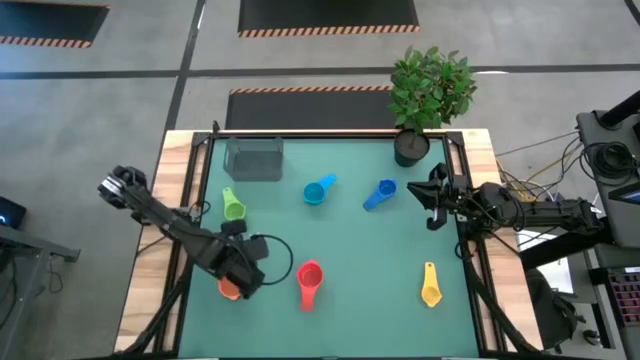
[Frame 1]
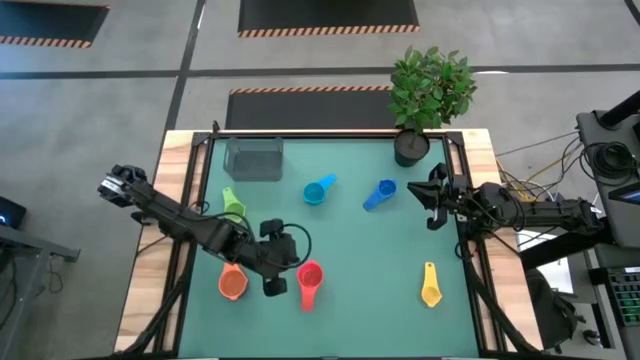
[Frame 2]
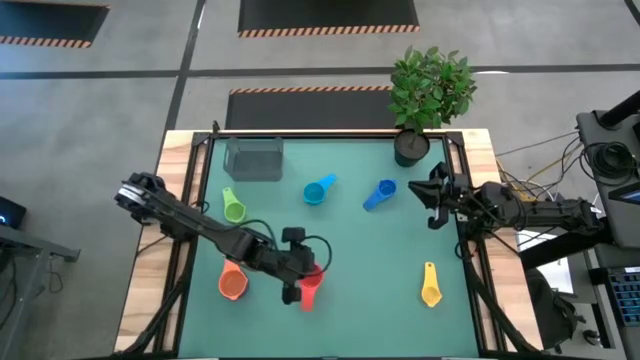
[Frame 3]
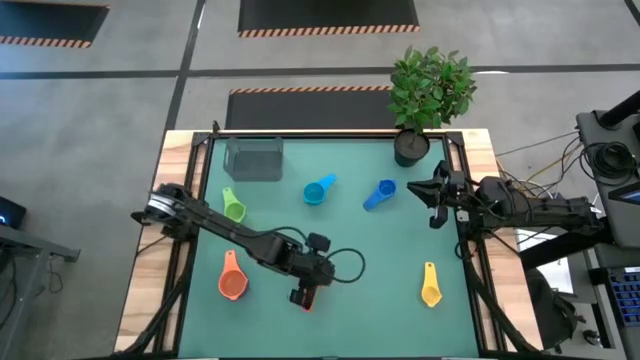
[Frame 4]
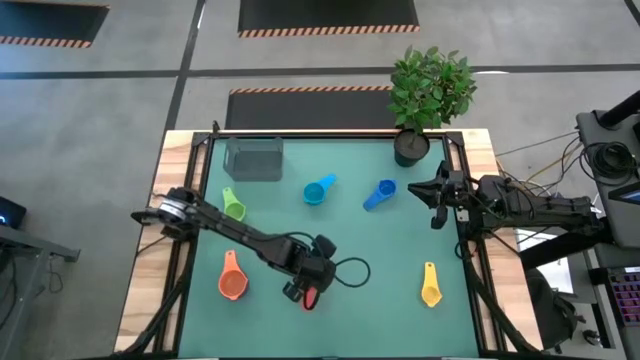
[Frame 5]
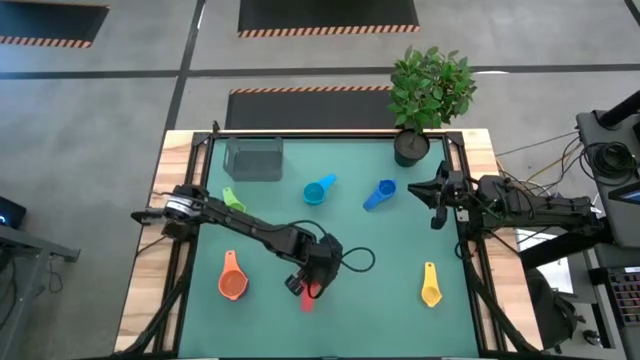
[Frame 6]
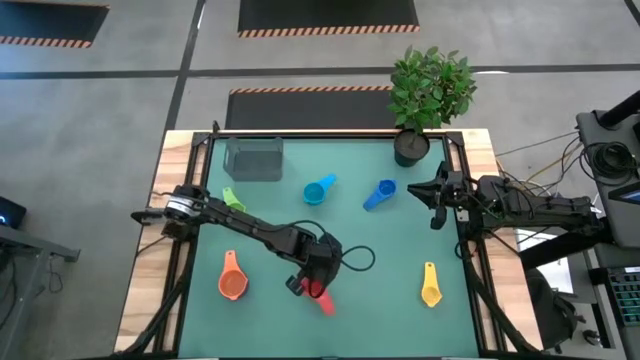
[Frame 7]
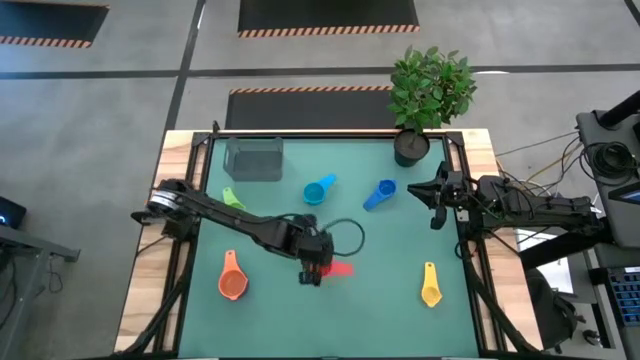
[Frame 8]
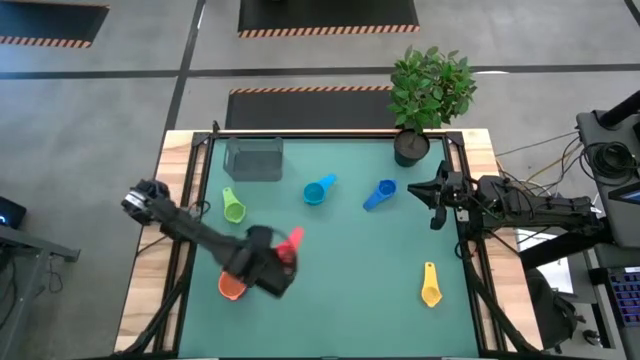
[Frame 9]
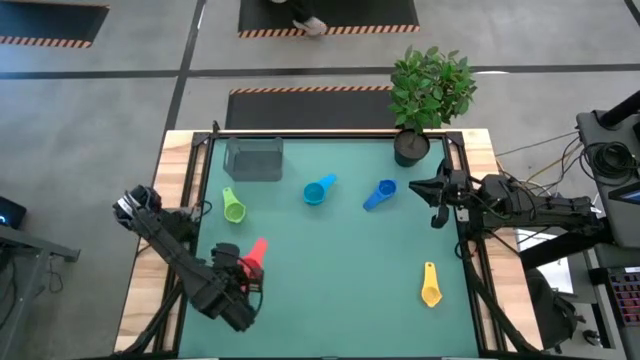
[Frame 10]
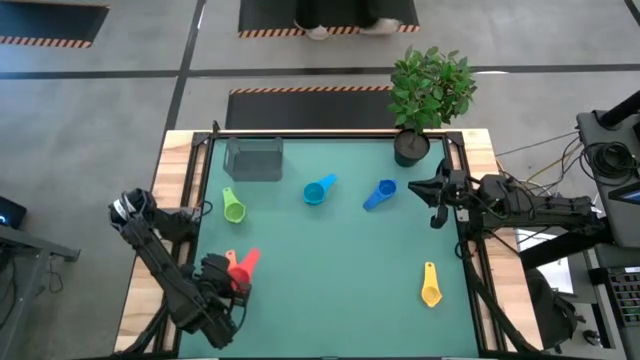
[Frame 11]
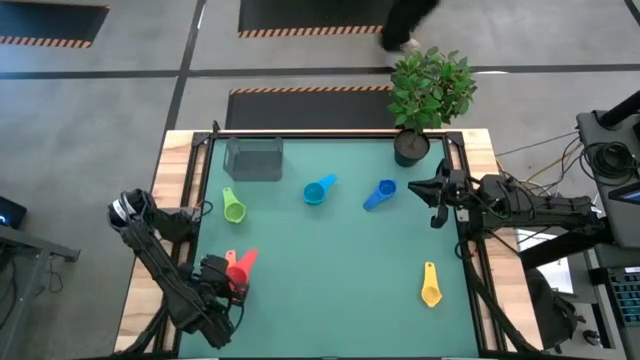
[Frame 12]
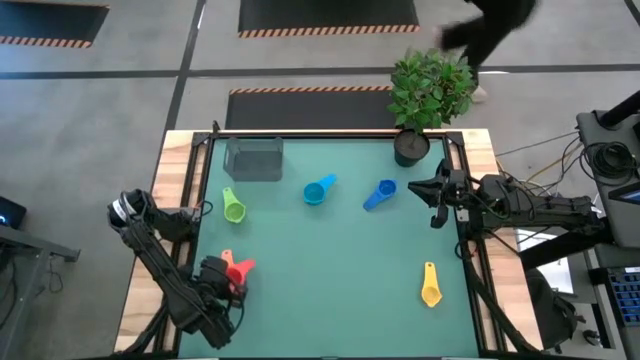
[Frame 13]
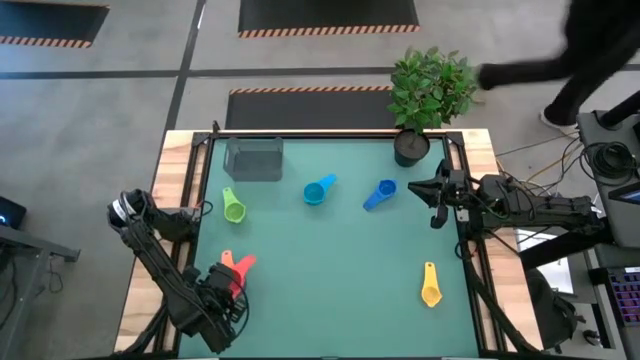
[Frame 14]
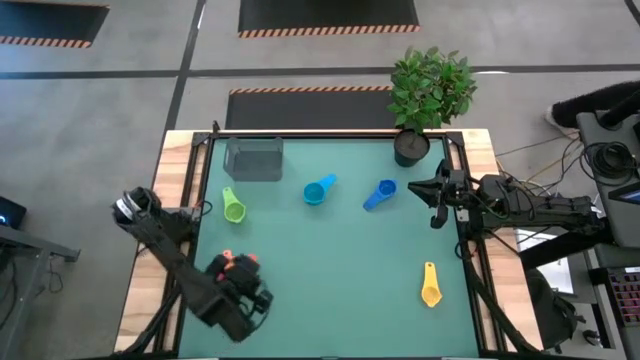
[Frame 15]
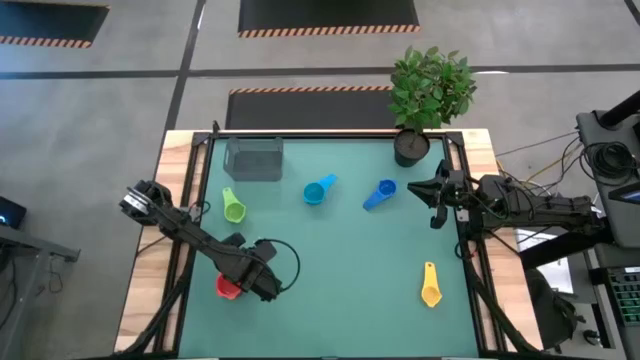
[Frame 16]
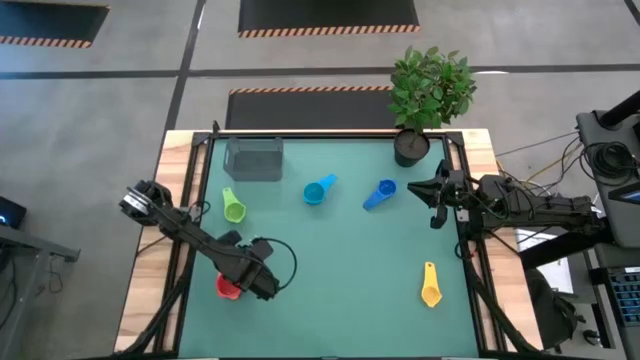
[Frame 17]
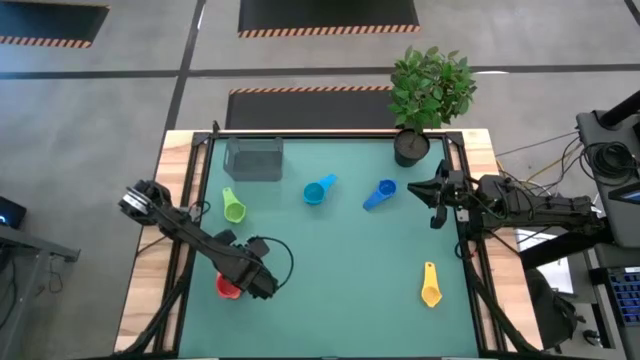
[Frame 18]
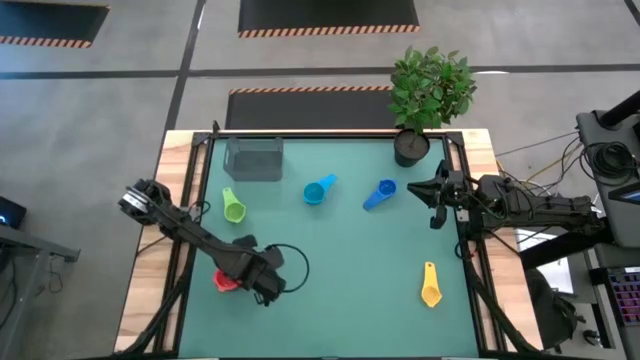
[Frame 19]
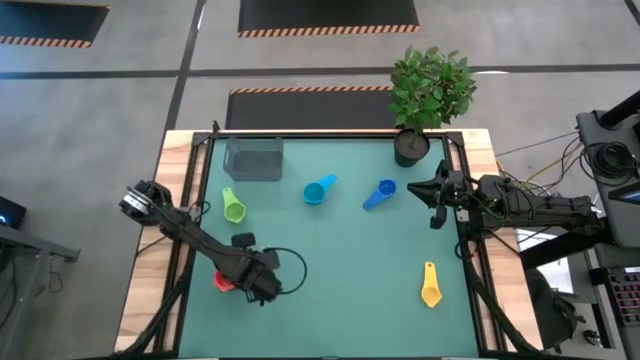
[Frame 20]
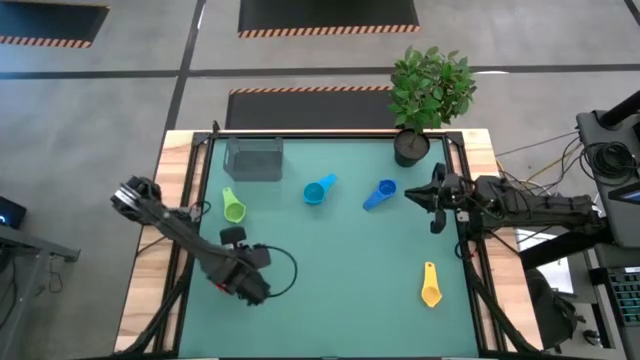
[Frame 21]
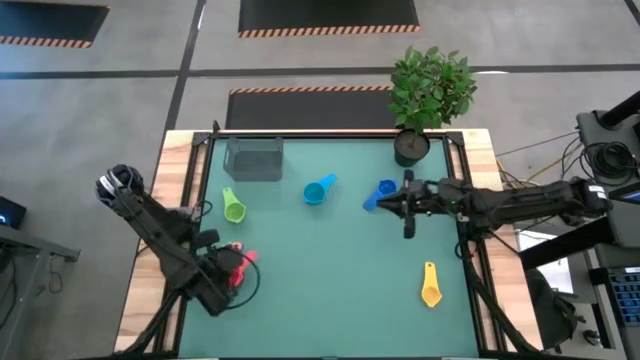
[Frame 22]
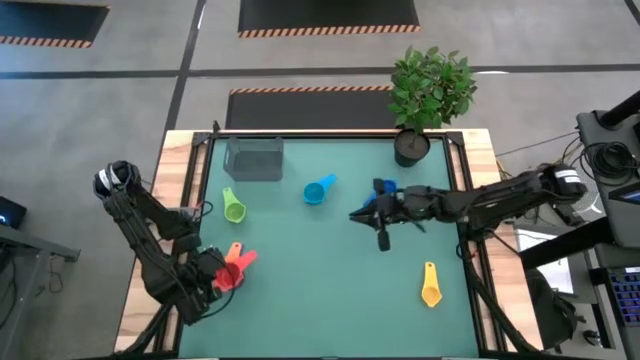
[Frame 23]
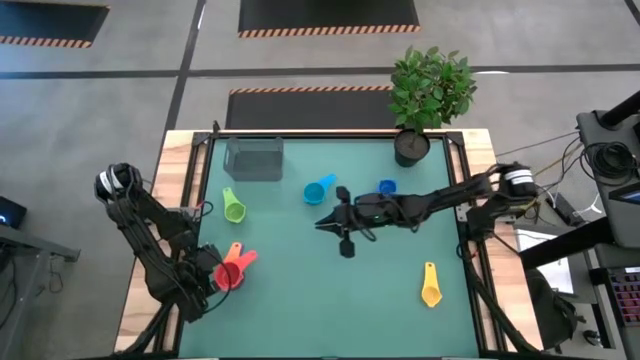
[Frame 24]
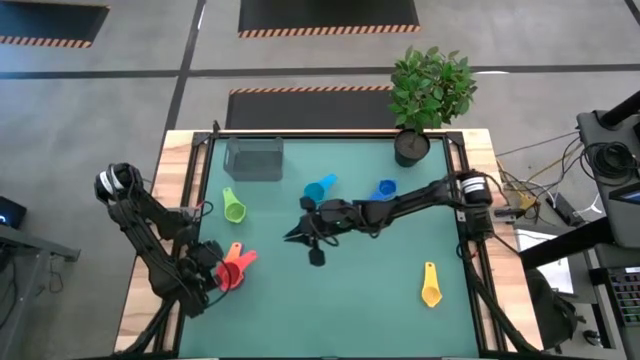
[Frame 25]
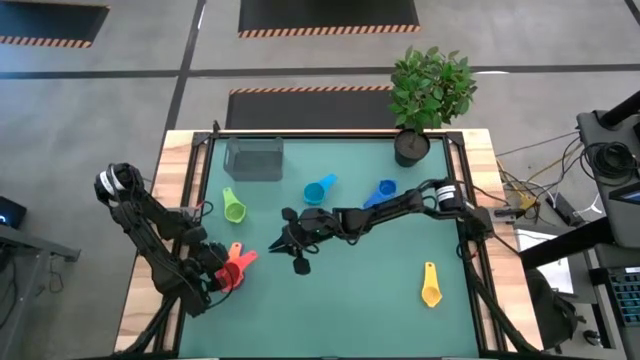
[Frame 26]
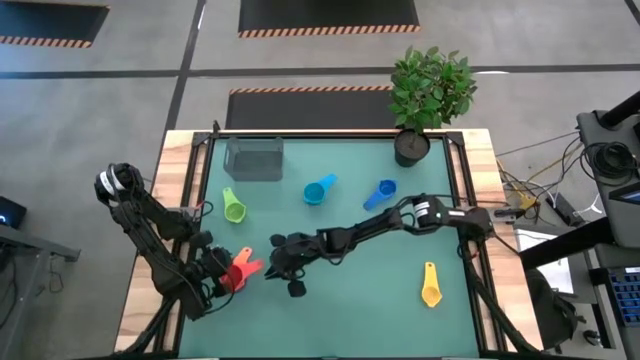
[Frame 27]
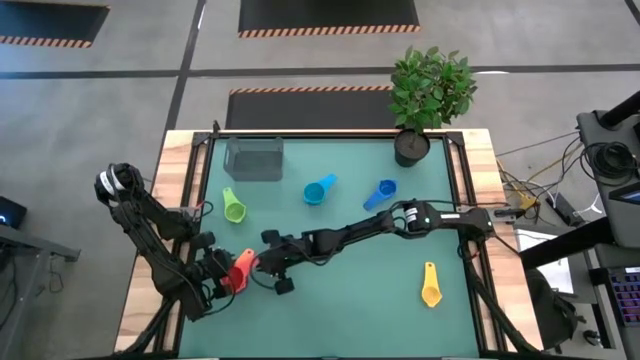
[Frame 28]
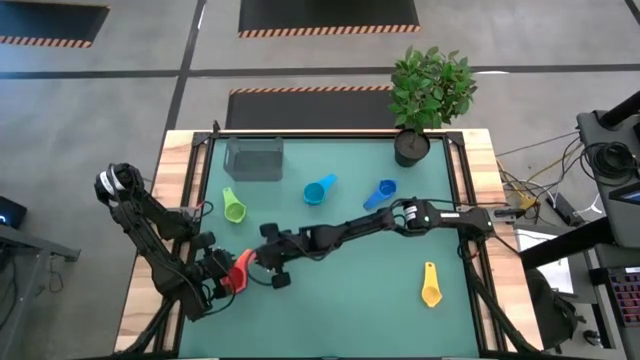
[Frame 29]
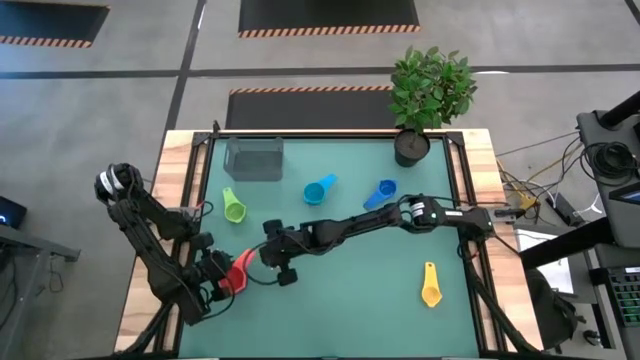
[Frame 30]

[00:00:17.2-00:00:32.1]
Task: Nest measuring cups in basket
Stack the red measuring cup on top of the orange measuring cup

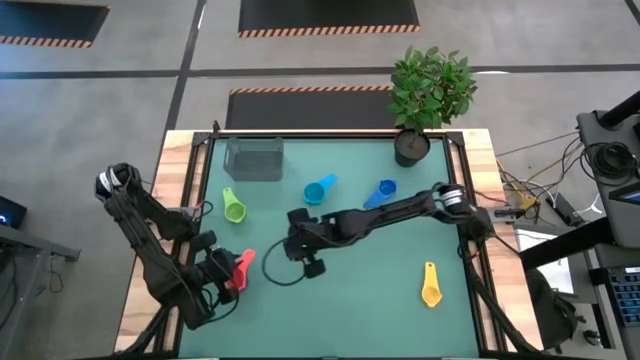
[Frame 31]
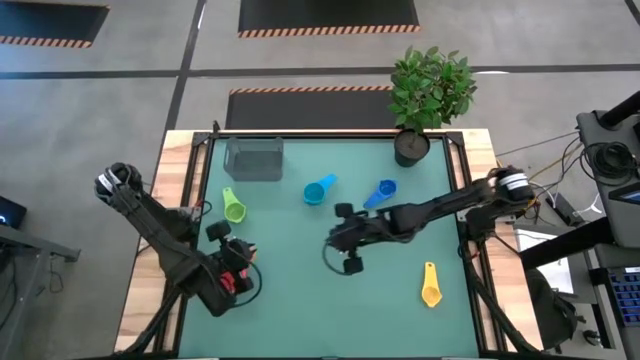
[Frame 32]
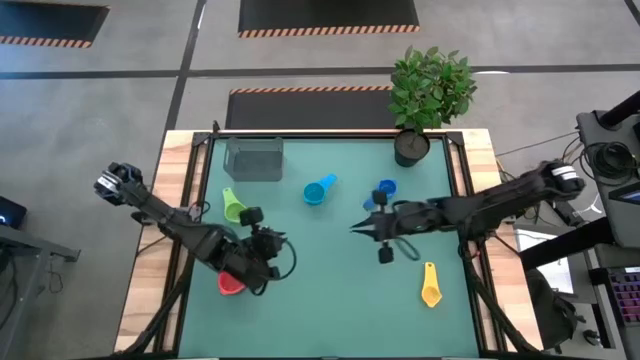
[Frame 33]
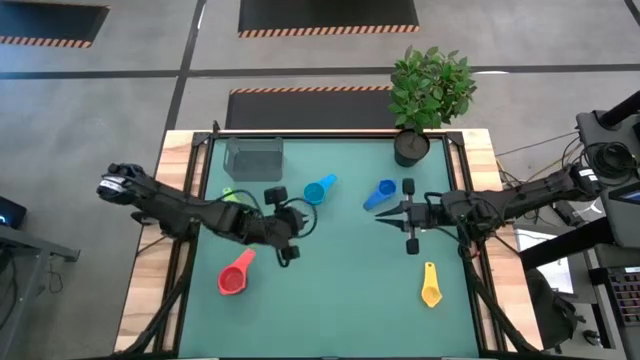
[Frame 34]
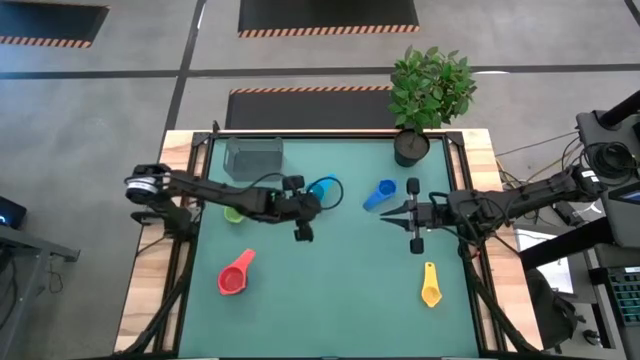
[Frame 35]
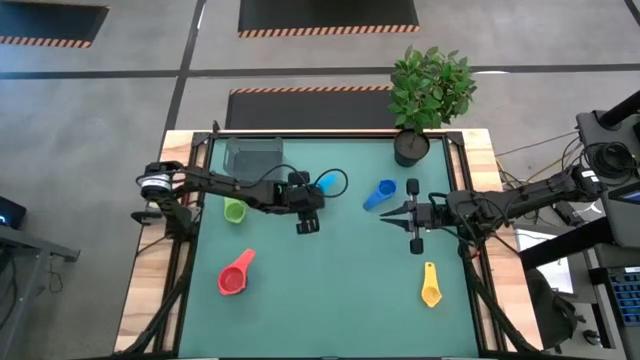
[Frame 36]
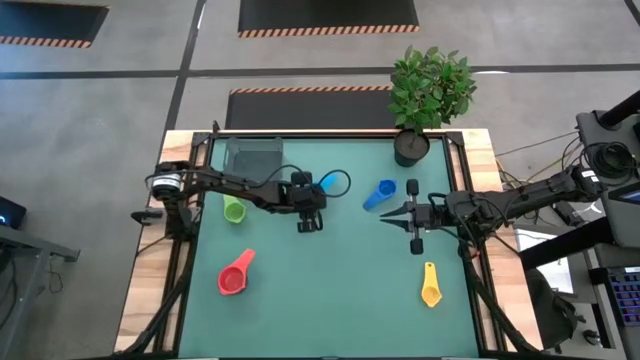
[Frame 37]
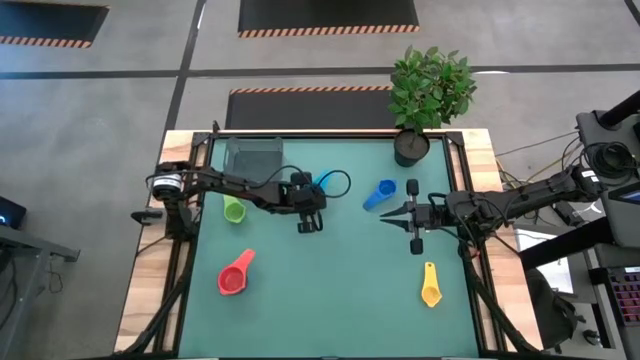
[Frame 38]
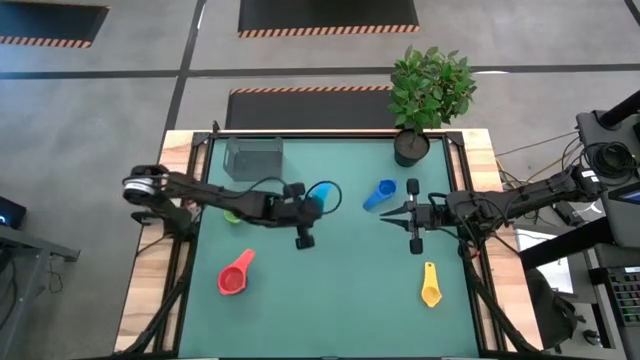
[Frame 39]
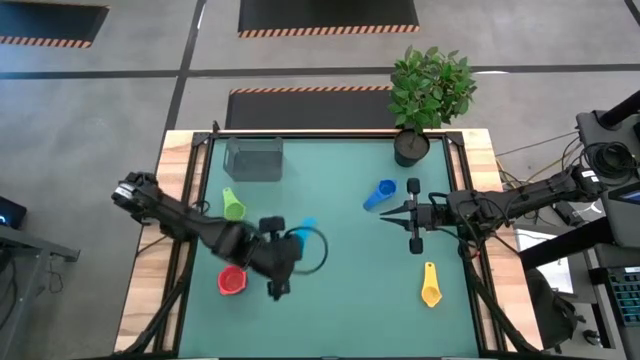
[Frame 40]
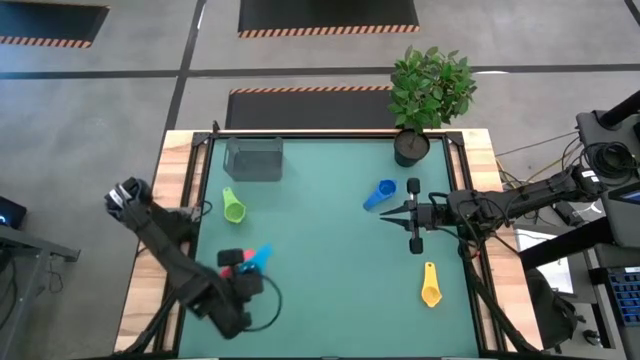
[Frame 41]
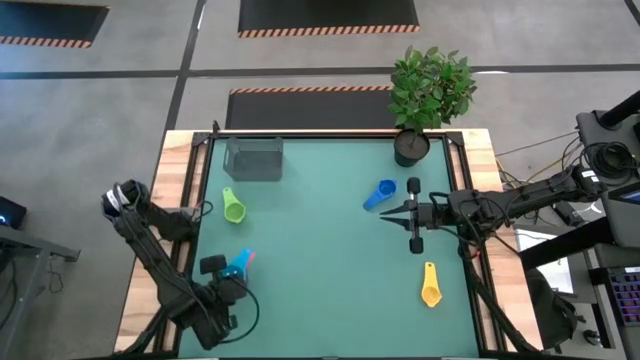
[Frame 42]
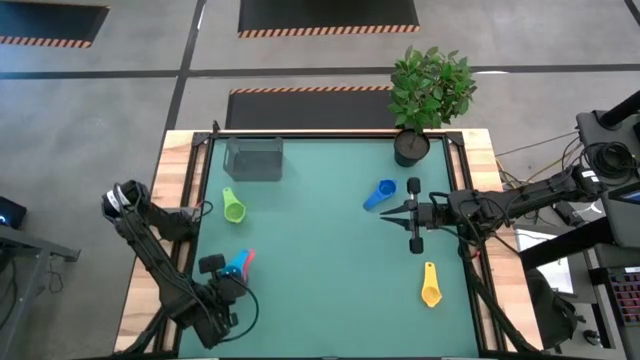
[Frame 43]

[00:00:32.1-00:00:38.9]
Stack the light blue measuring cup on top of the red measuring cup

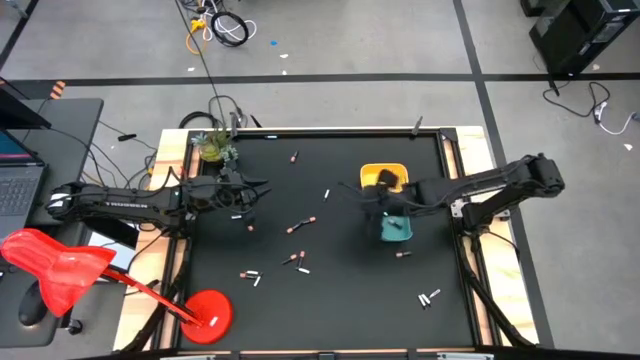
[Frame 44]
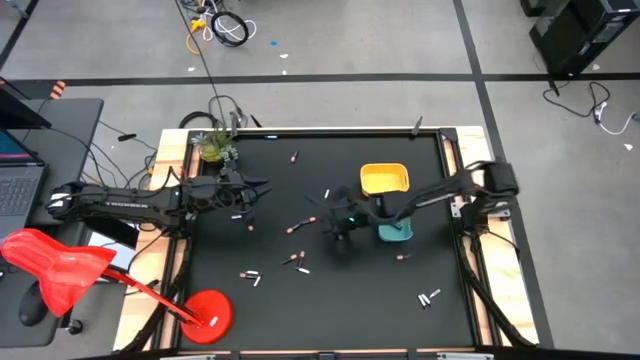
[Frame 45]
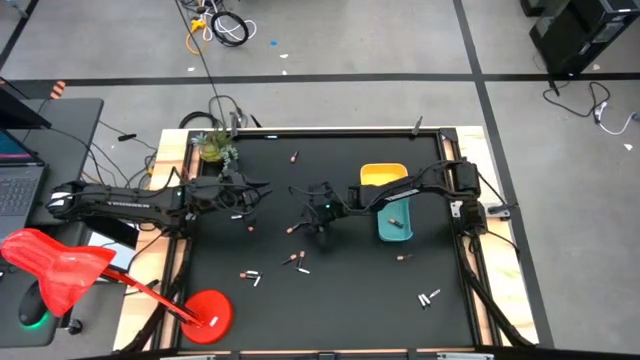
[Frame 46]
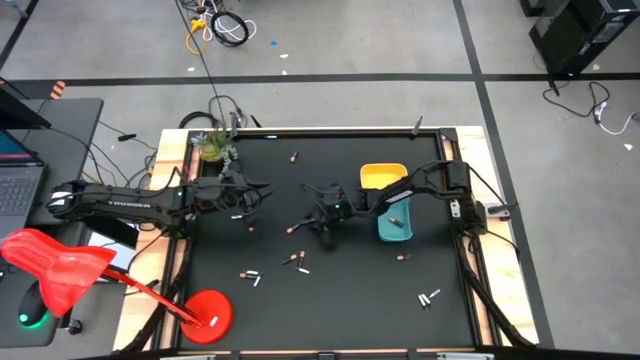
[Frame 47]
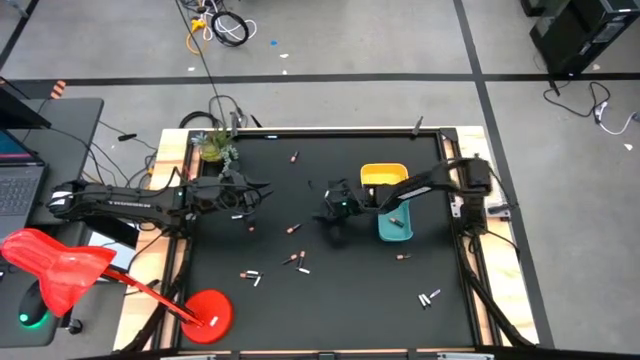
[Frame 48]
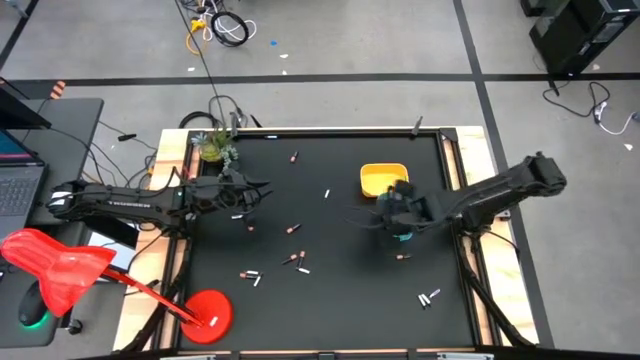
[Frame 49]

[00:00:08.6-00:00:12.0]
Task: Sort batteries
Put the gold black battery into the blue bin
